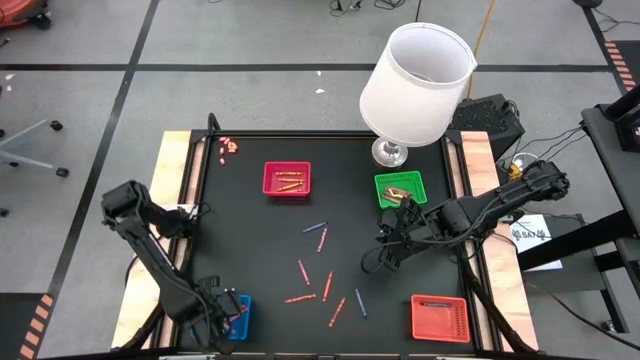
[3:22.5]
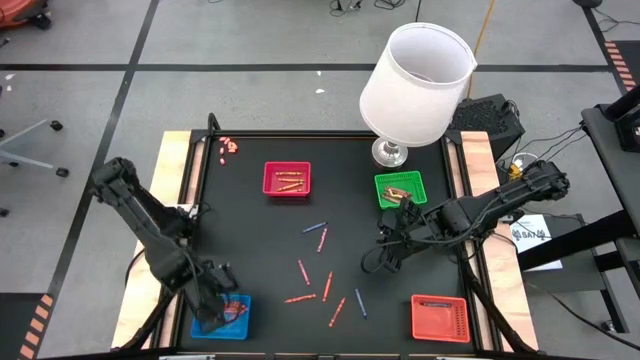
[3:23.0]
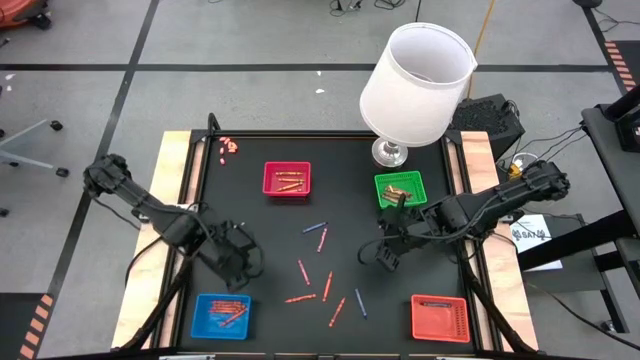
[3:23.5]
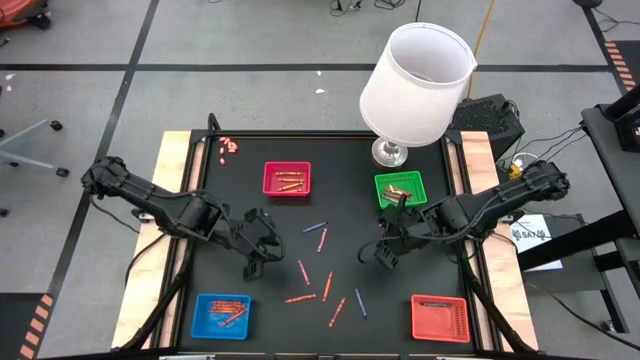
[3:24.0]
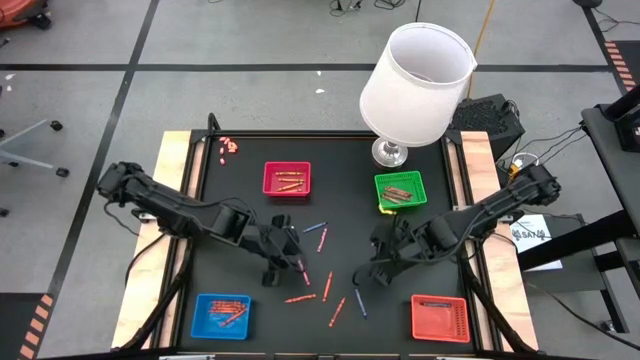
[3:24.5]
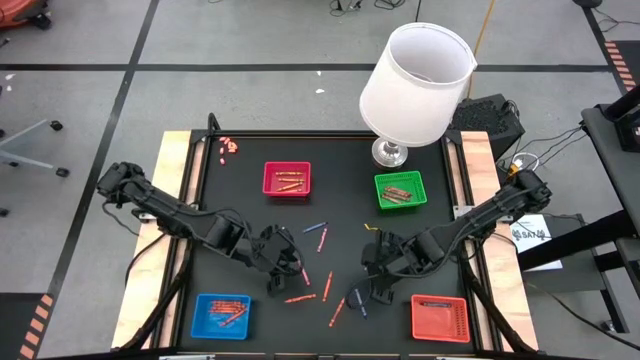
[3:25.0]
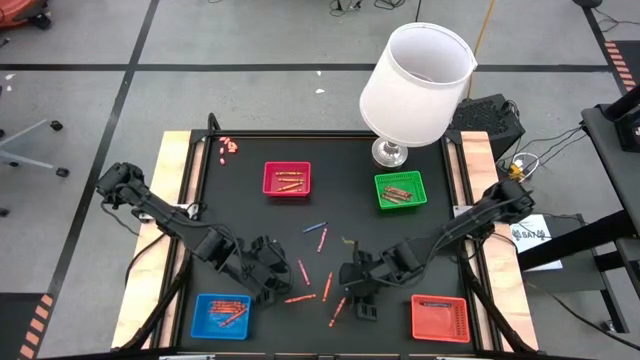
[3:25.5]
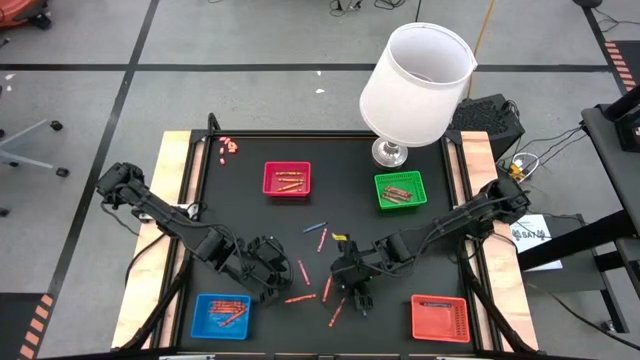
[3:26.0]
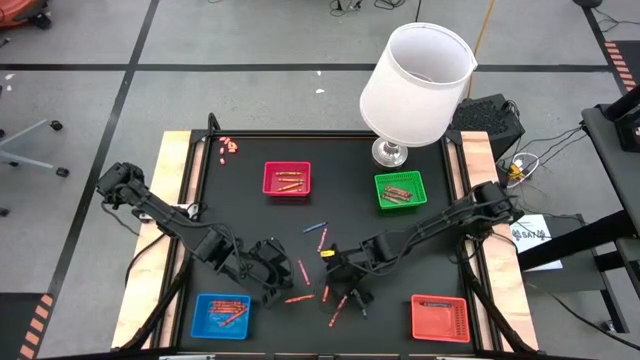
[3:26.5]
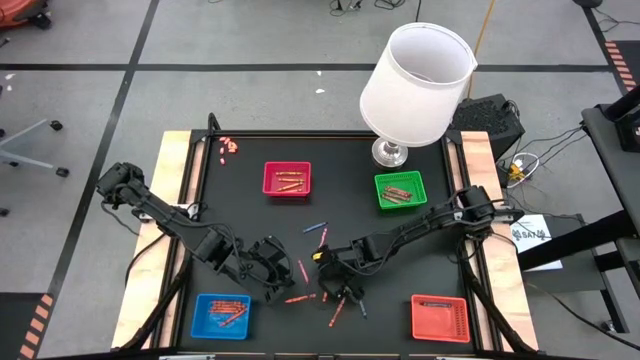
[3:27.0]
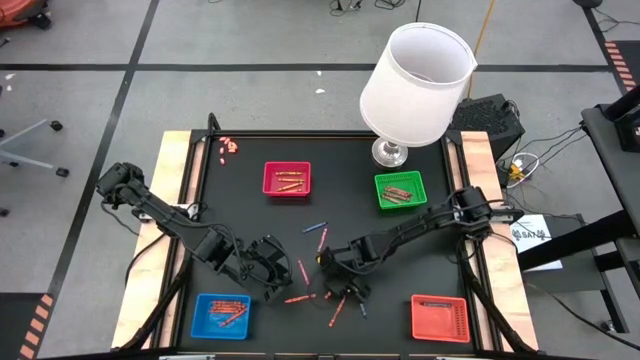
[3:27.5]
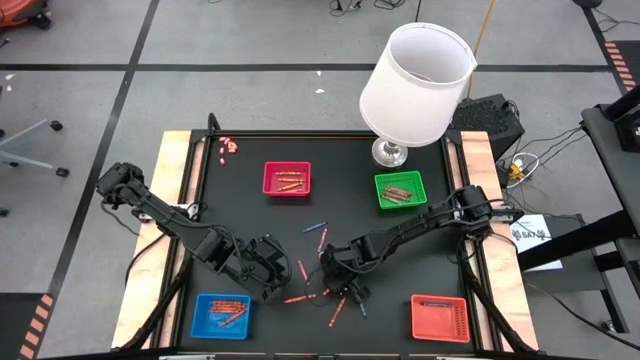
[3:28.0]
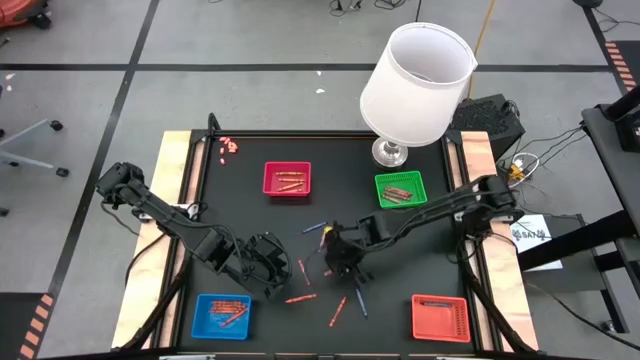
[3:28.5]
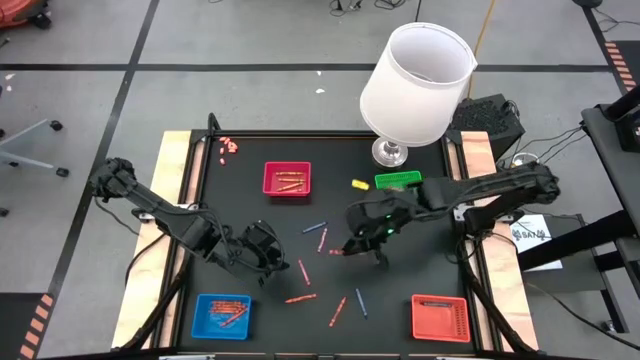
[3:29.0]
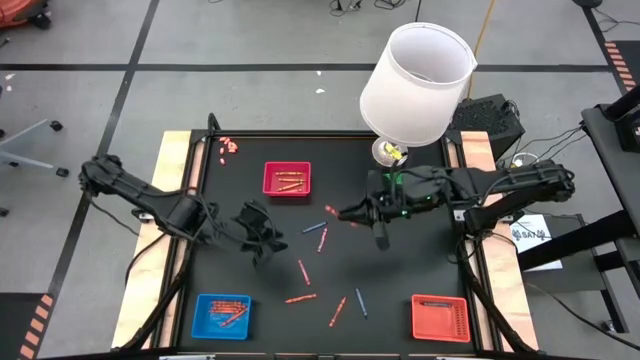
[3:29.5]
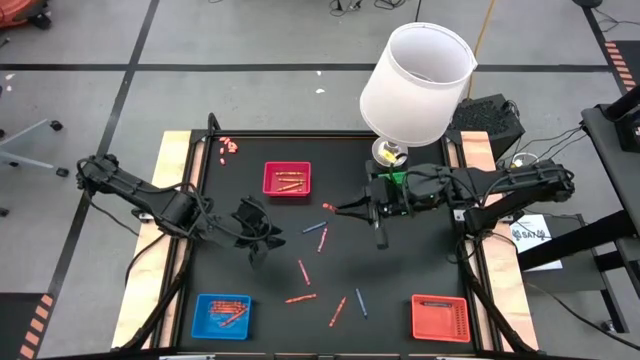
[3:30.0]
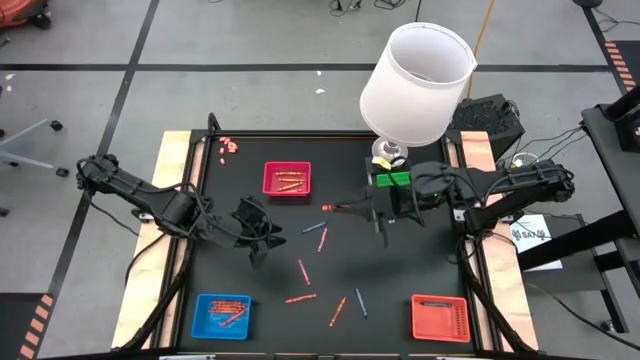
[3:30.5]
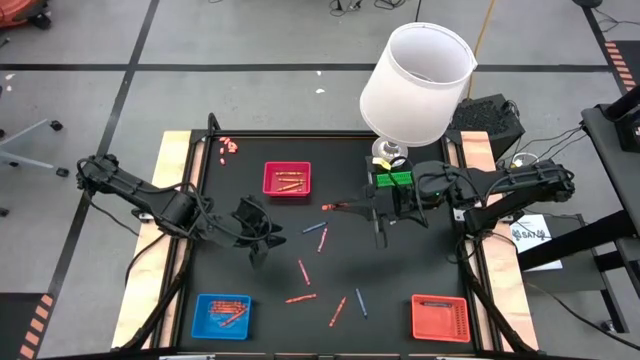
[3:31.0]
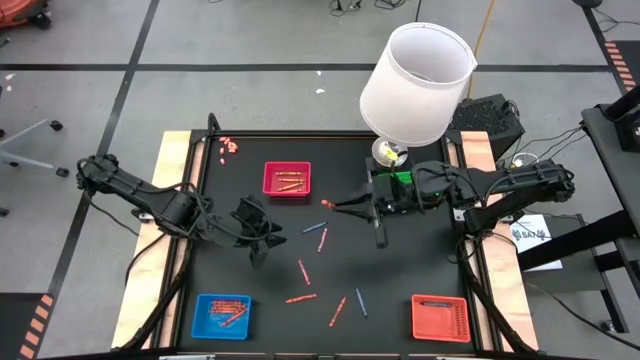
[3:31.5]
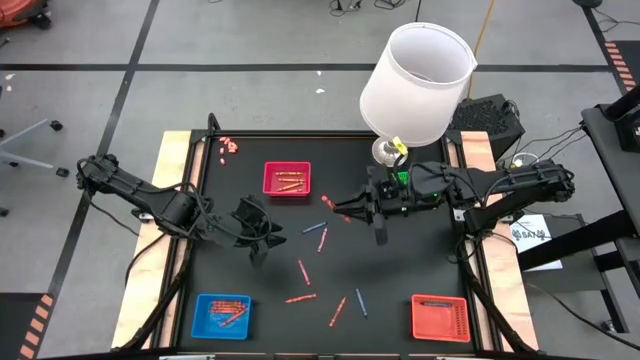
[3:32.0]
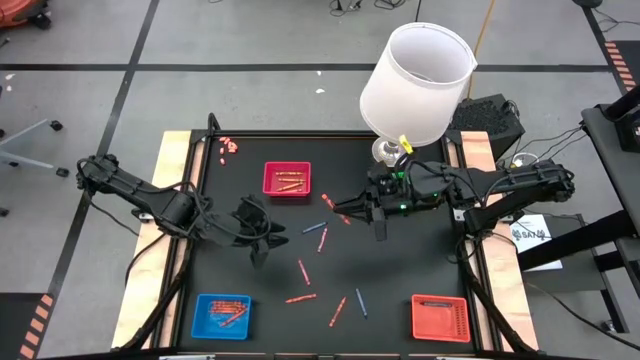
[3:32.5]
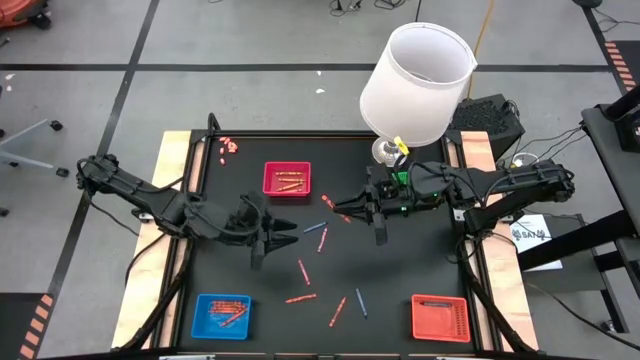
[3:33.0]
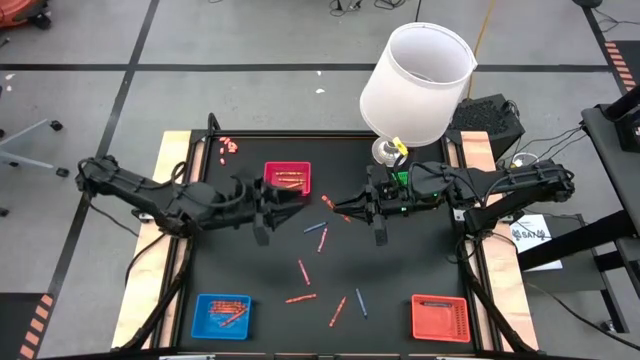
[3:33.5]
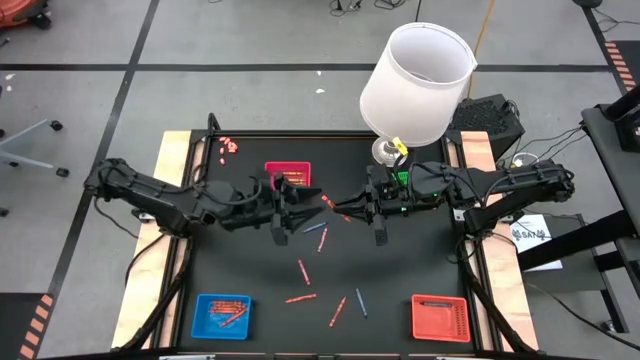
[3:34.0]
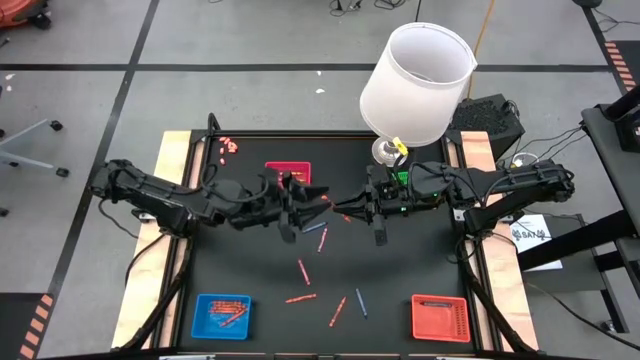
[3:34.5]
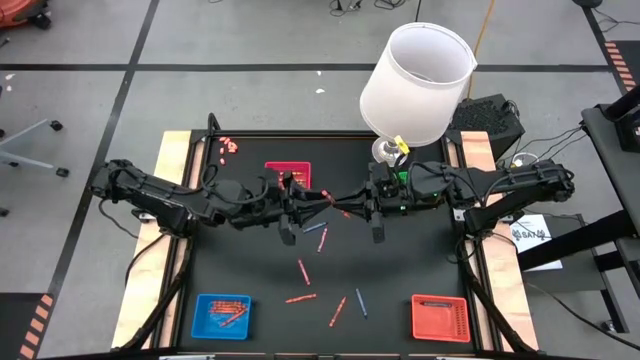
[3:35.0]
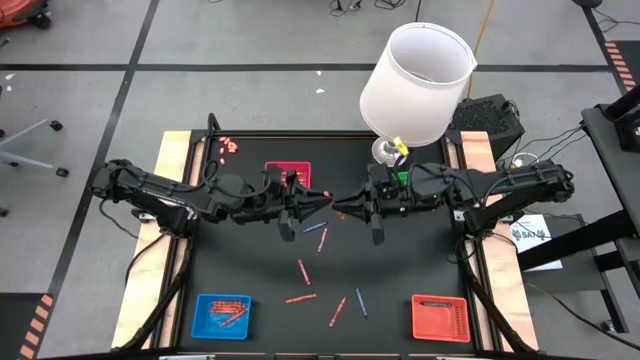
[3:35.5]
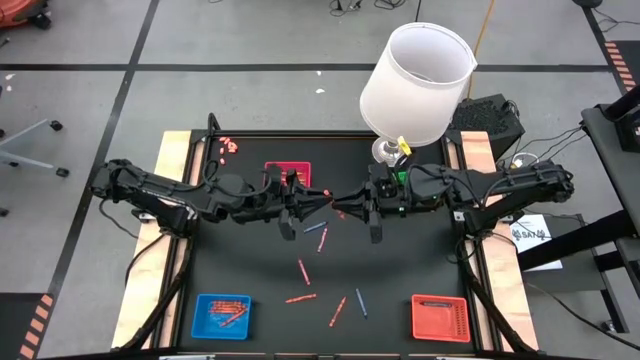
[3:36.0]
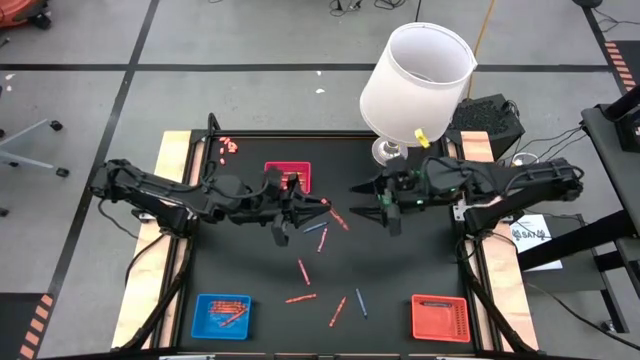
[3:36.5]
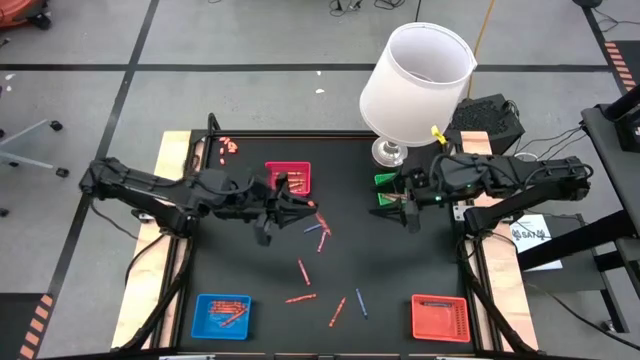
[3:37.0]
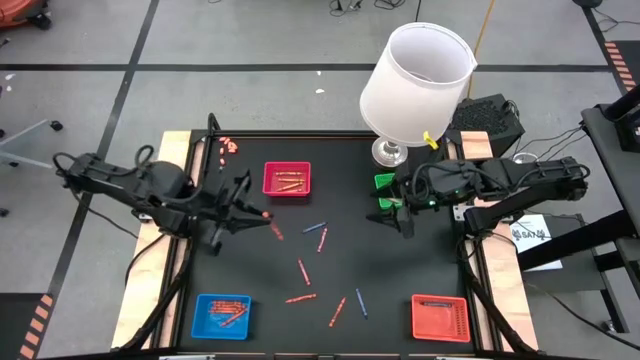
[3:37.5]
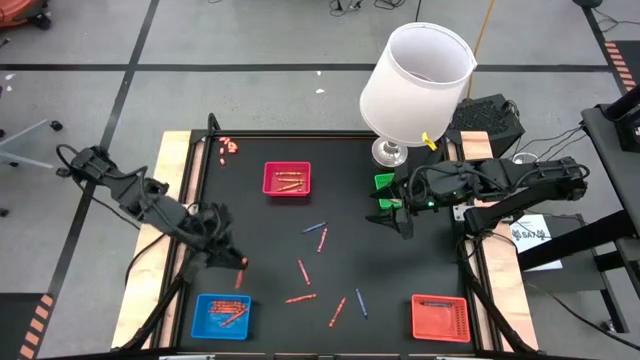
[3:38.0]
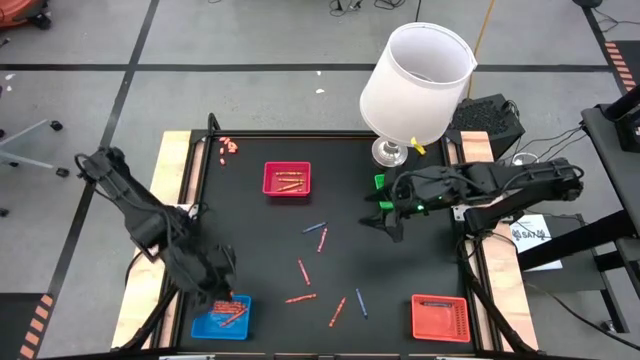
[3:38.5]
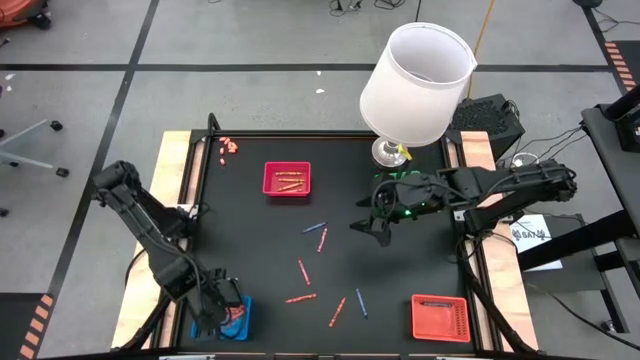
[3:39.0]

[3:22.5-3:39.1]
Task: Sort crayons
Put the orange crayon into the blue basket

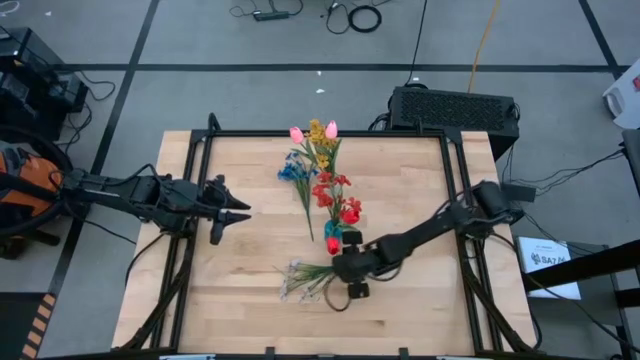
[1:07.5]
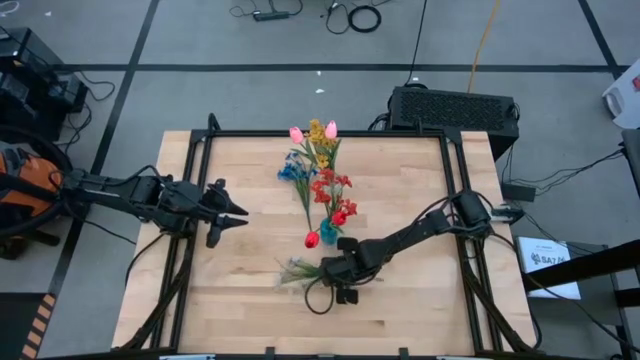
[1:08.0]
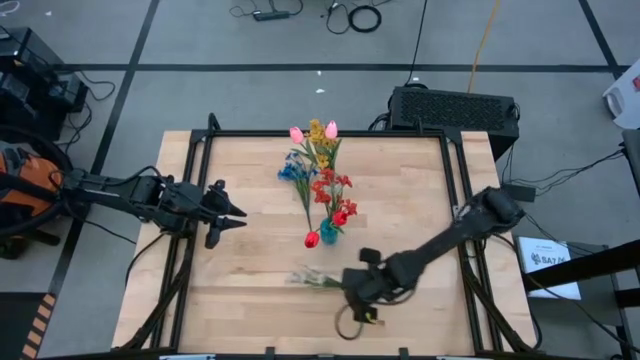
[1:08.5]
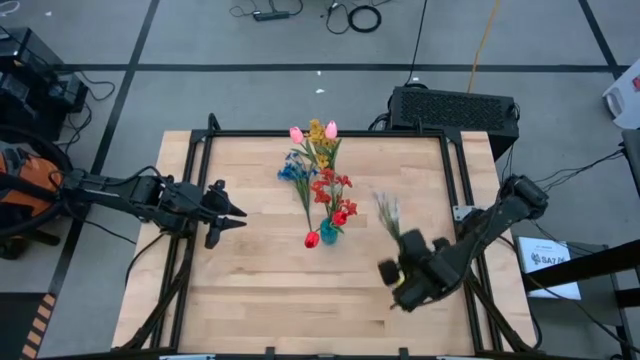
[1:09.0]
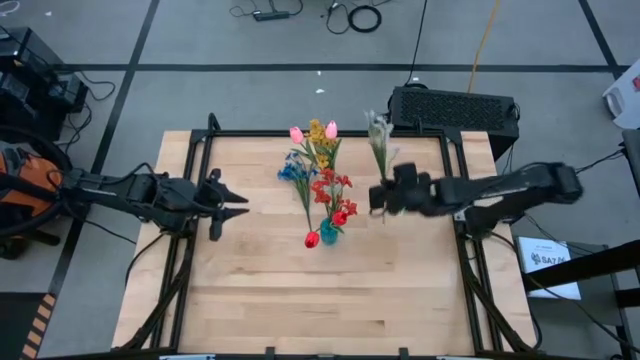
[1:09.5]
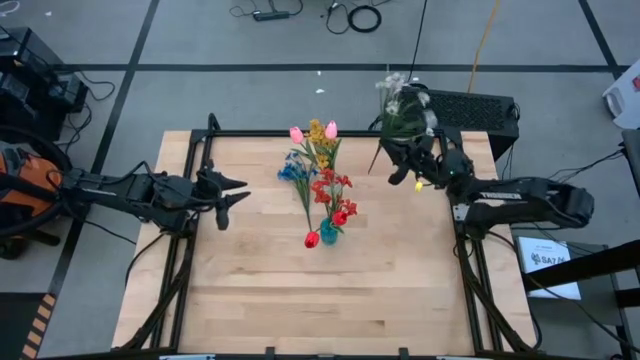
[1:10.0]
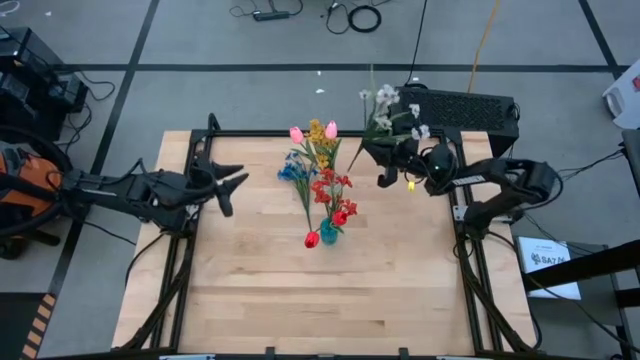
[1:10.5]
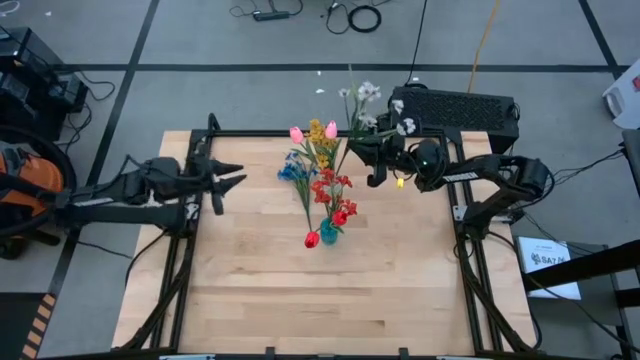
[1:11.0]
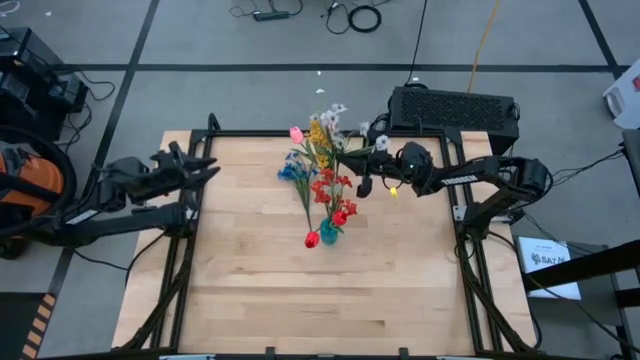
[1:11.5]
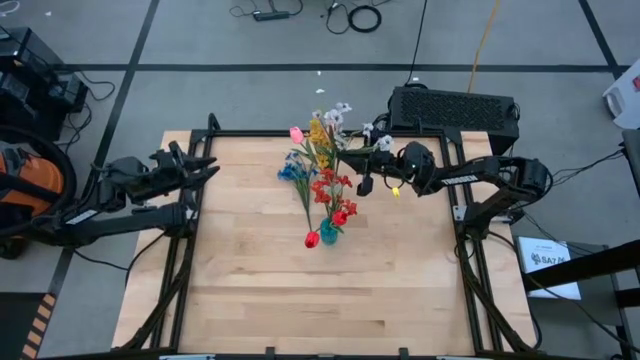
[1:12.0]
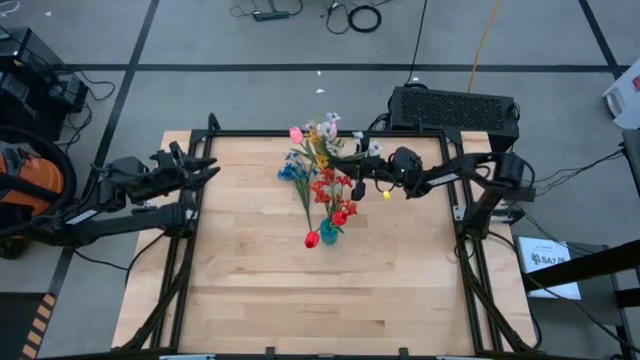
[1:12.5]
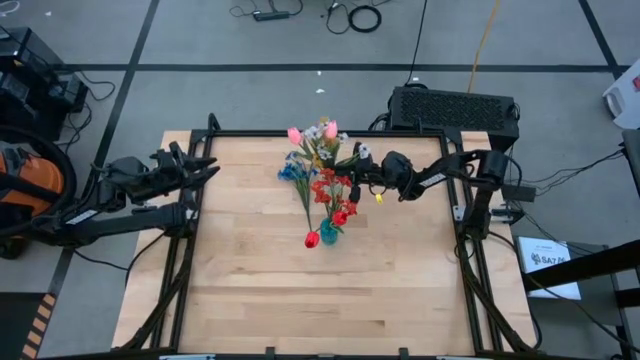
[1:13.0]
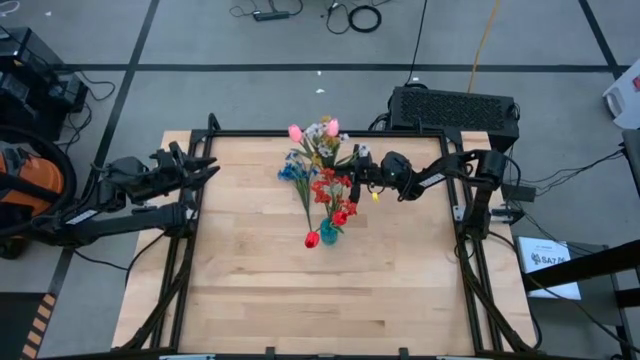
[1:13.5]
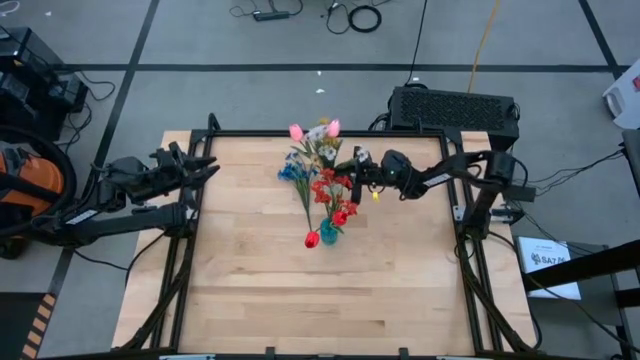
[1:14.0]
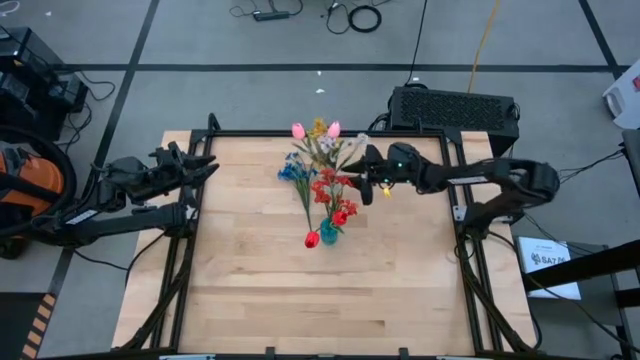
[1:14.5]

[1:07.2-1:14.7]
Task: Sort flowers into vase by color
Put the white flowers into the transparent vase
